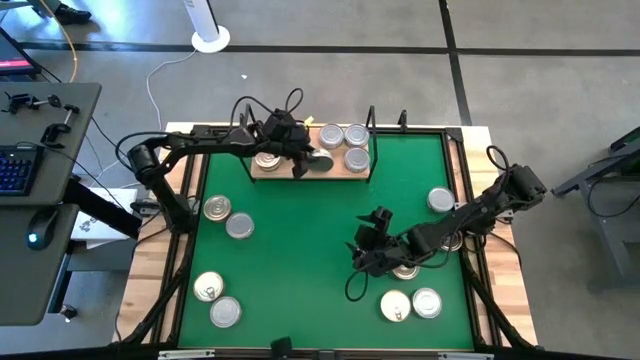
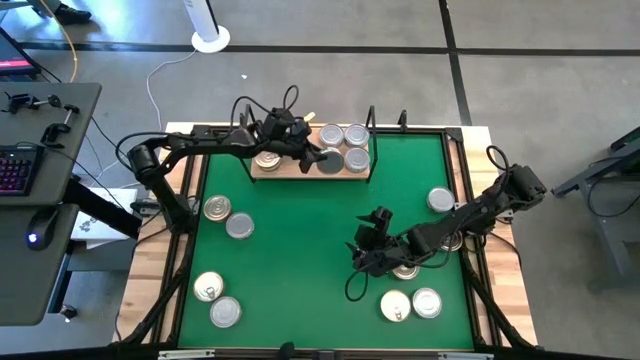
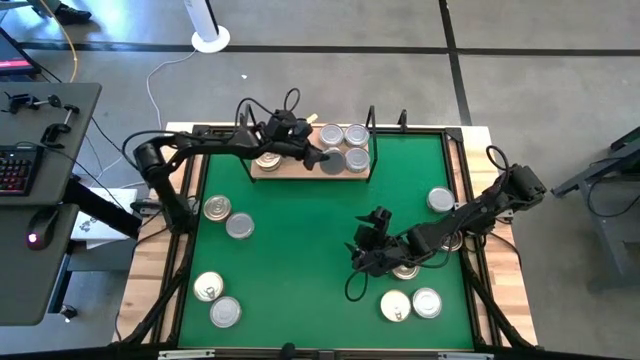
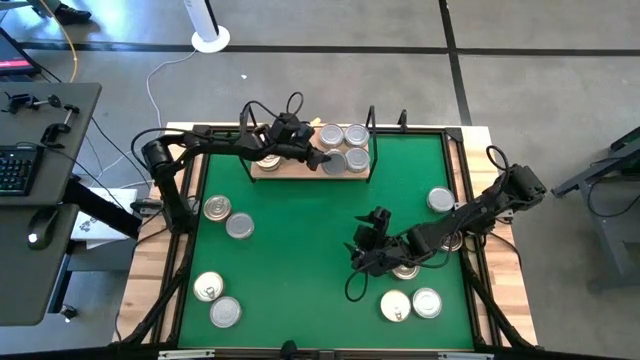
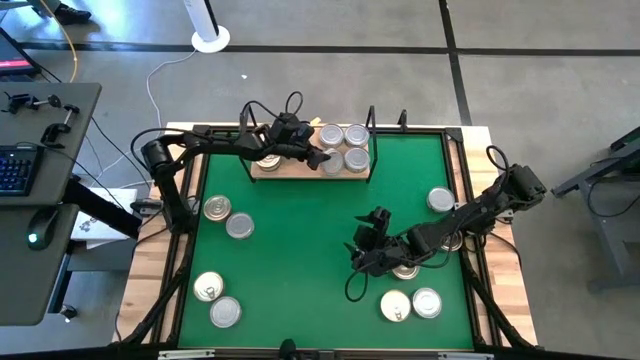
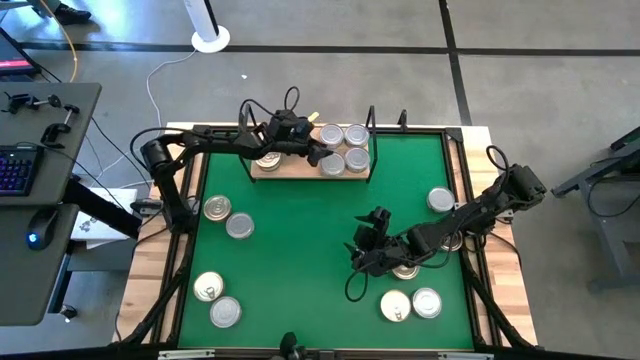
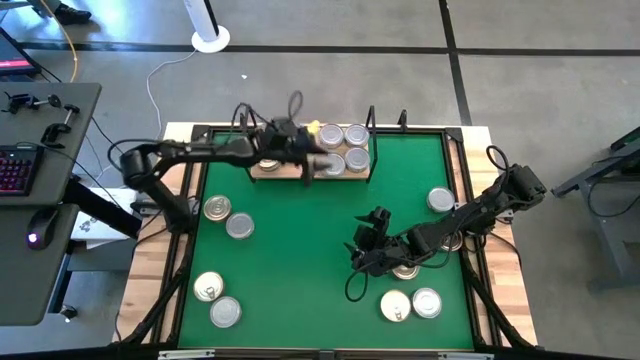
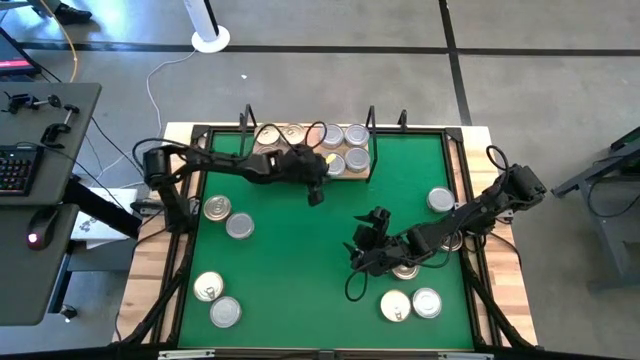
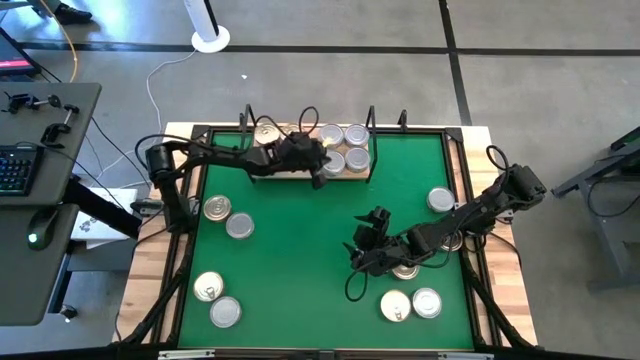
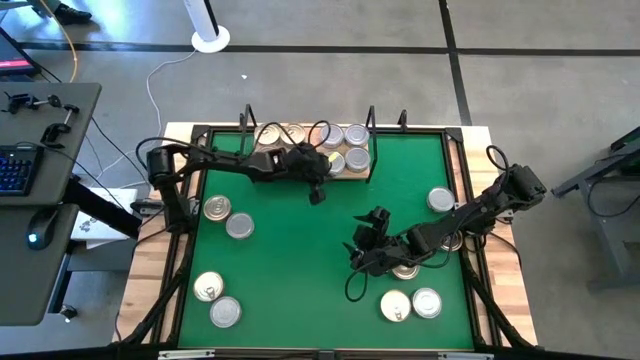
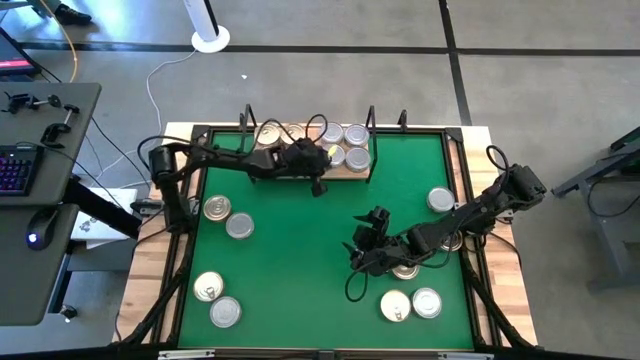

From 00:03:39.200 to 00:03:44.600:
Task: Stack canned seafood by type on shelf
Put the green tuna can on the shelf and align with the other green tuna can

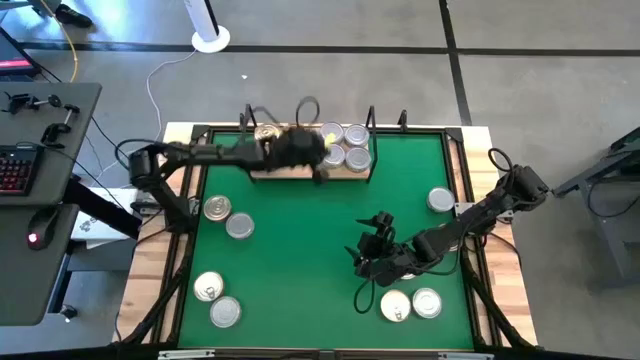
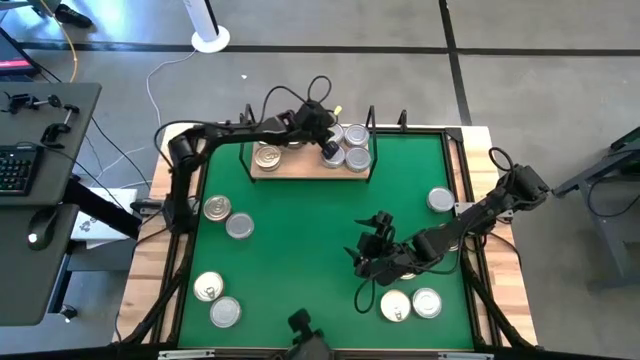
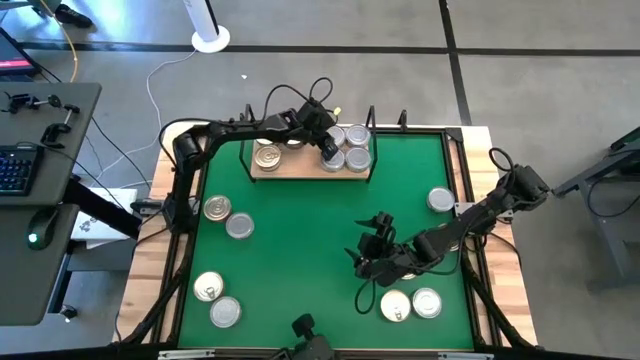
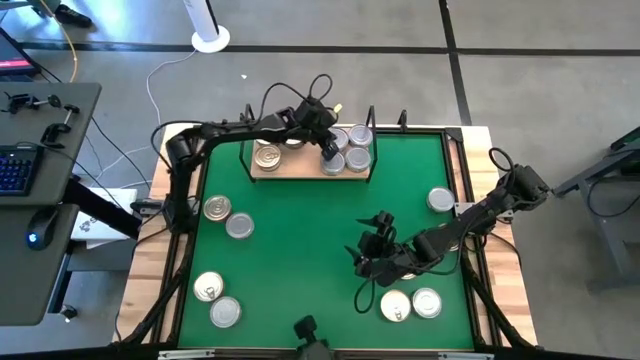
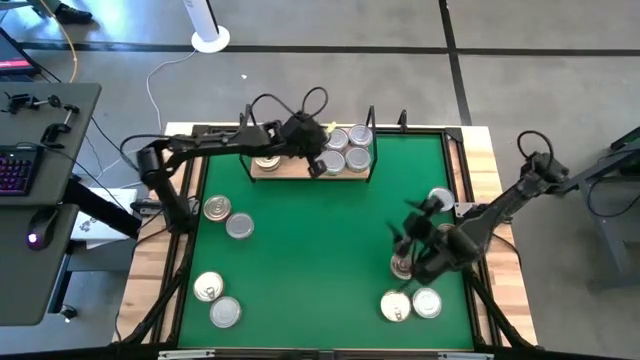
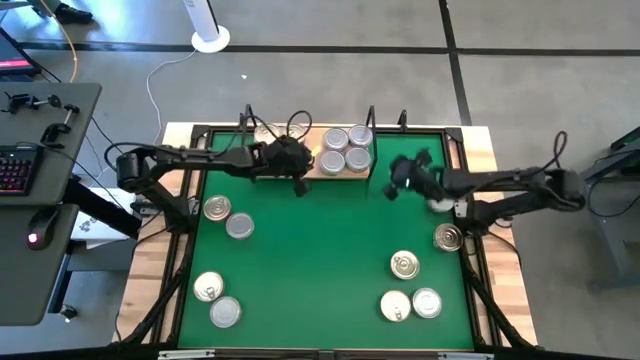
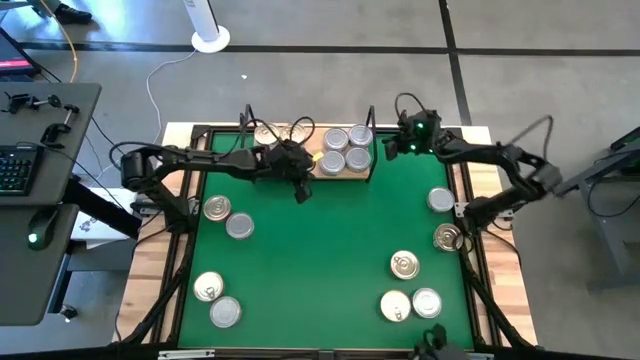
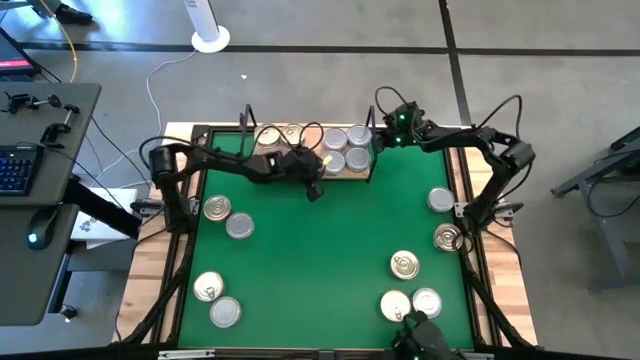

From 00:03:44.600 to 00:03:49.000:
Adjust the tuna cans on the shelf

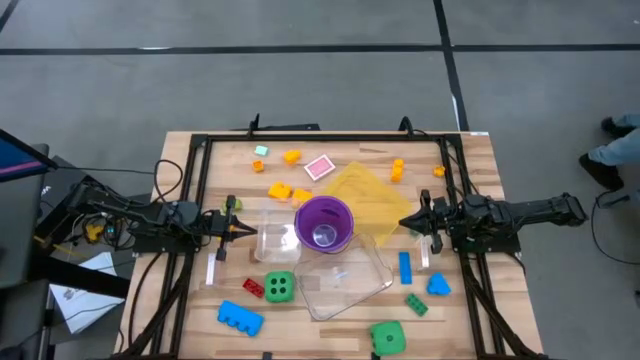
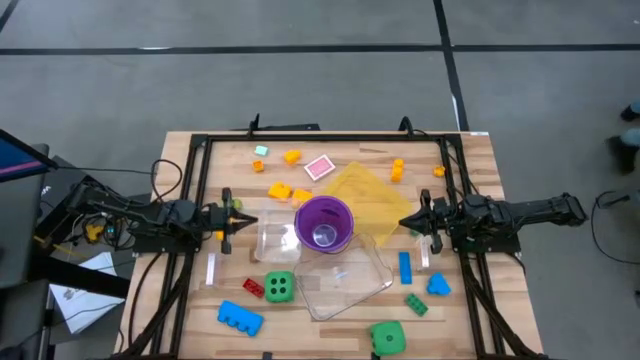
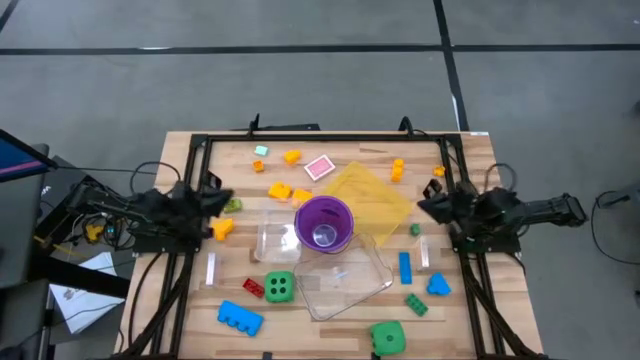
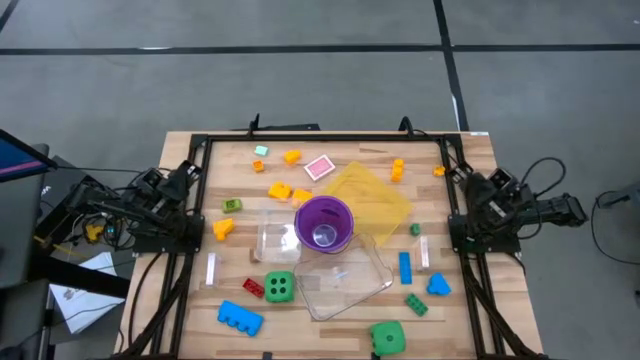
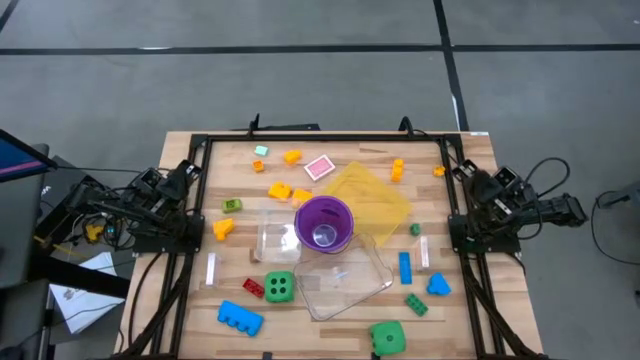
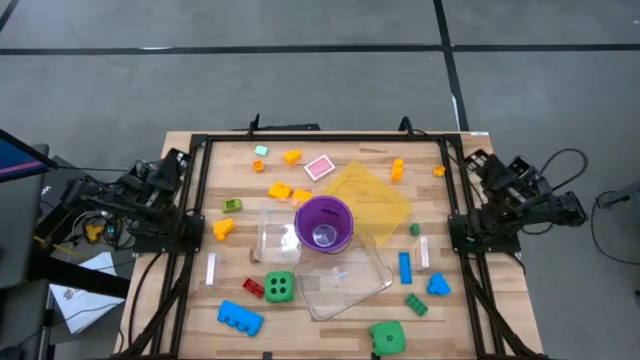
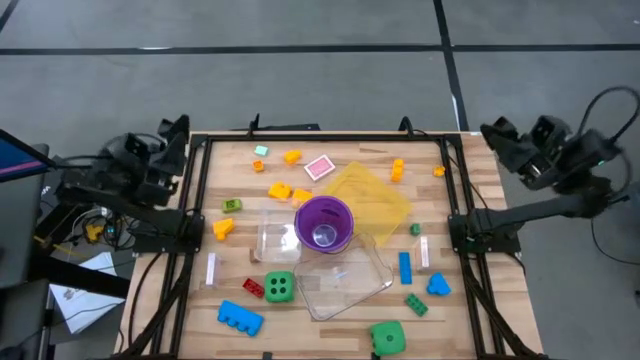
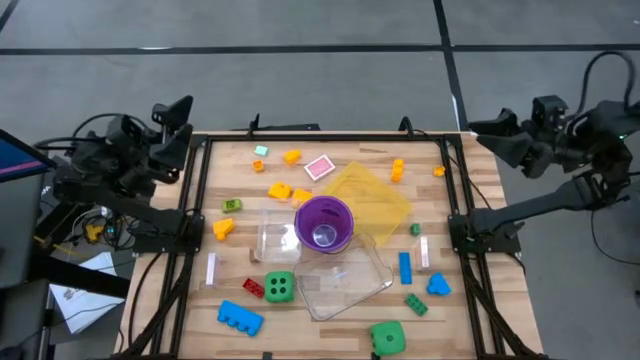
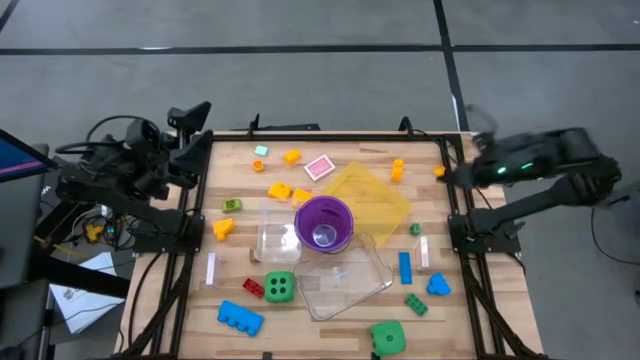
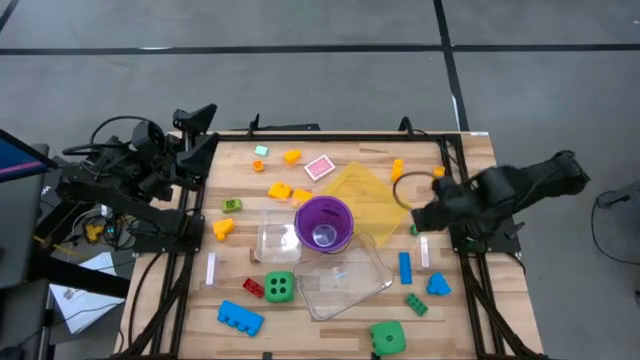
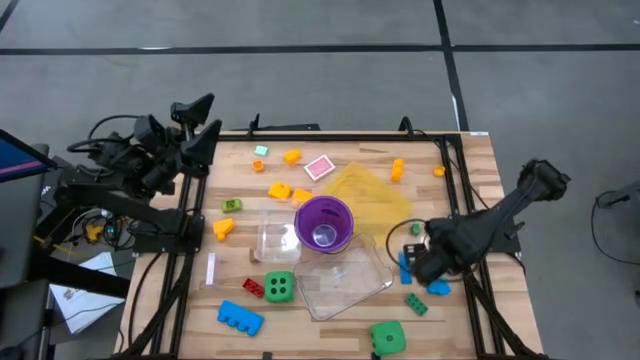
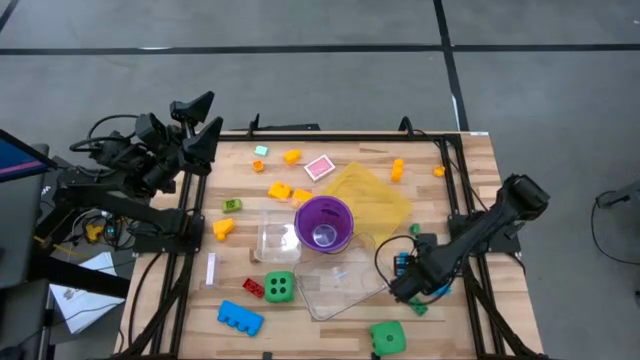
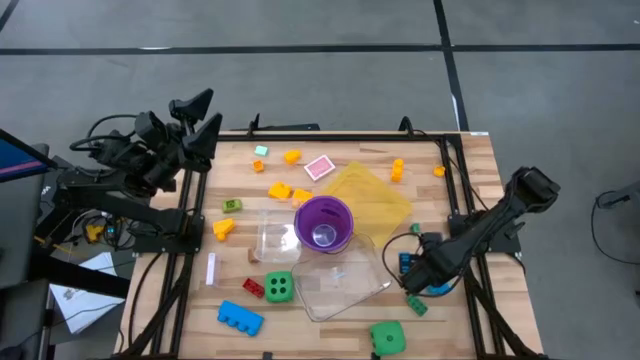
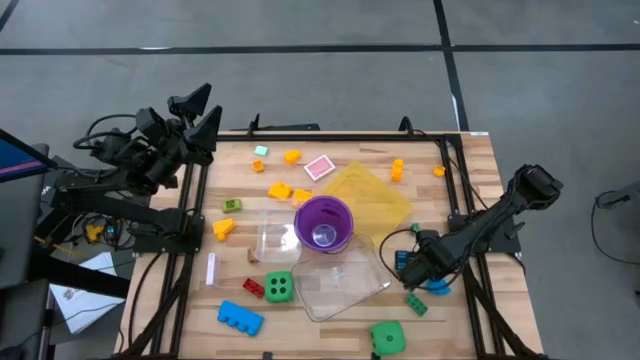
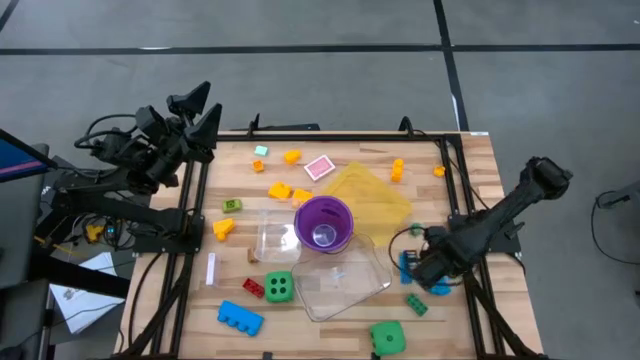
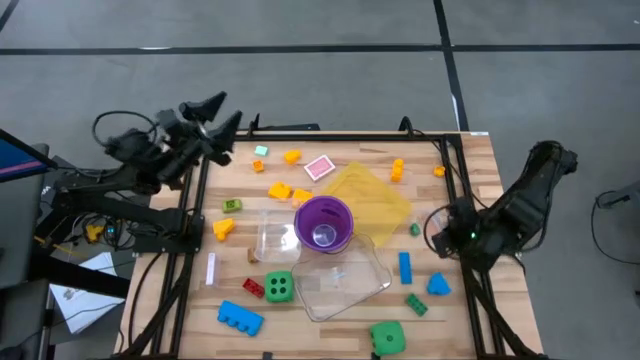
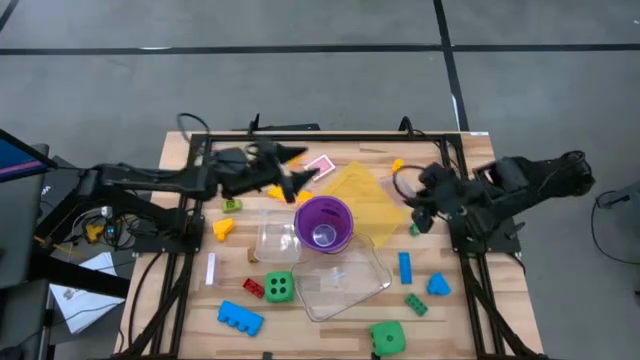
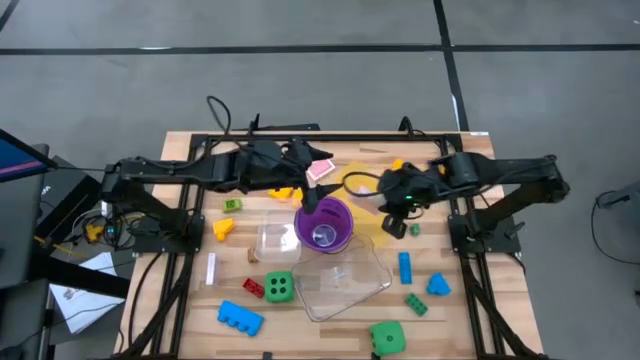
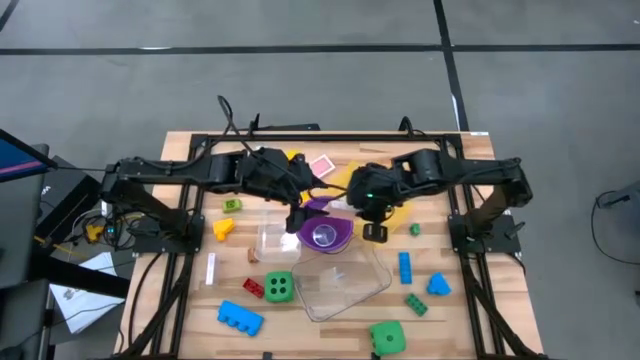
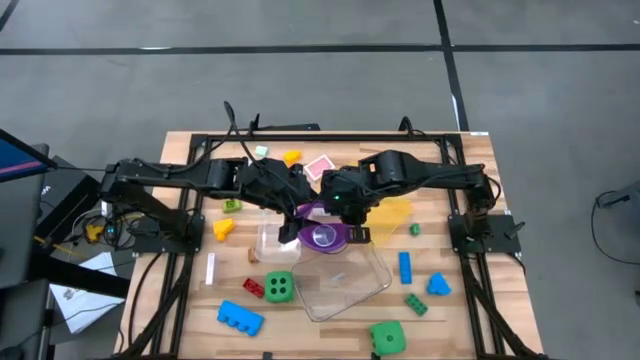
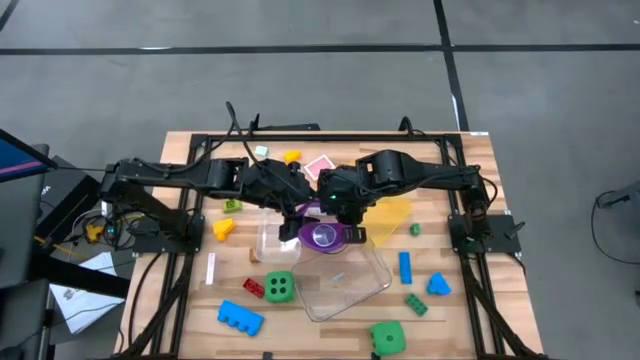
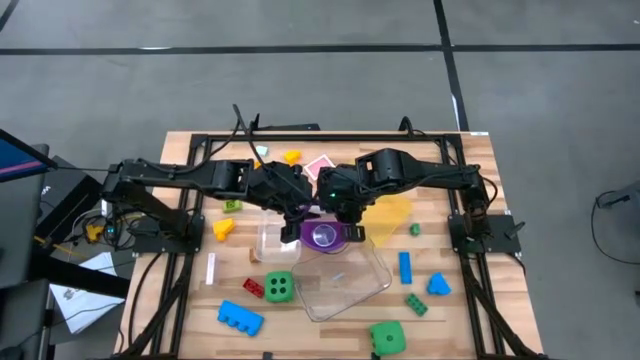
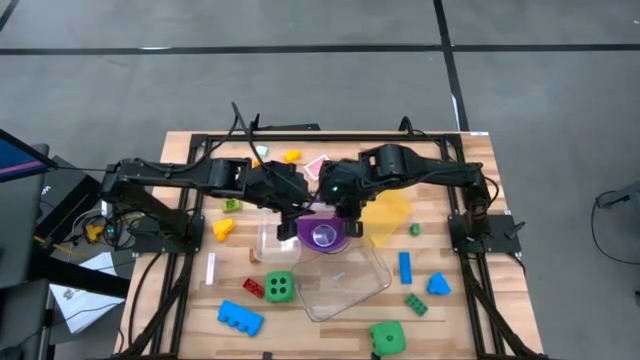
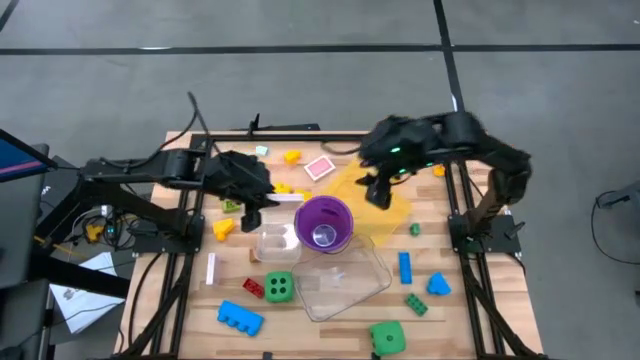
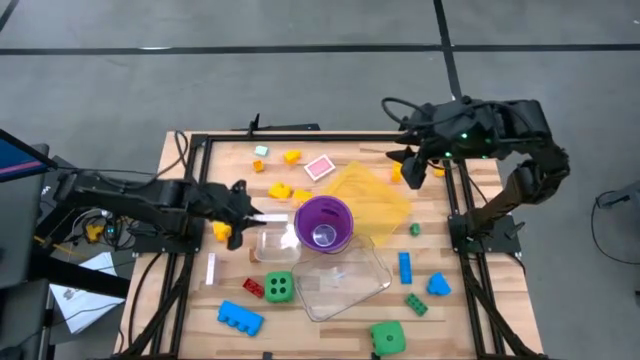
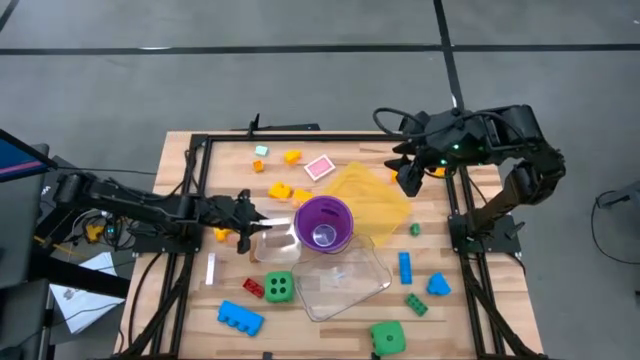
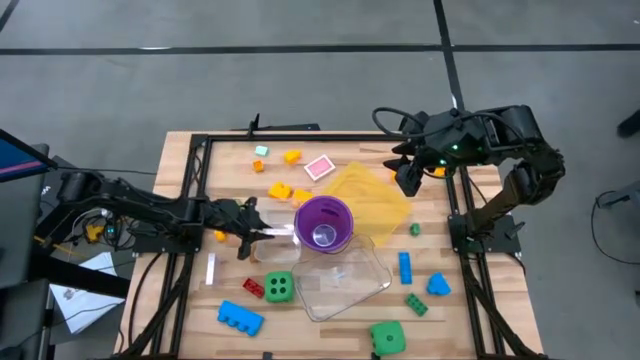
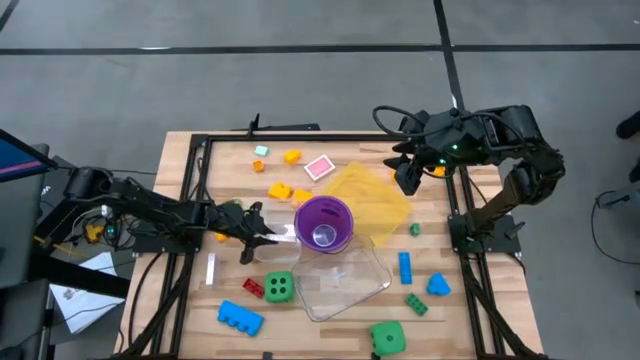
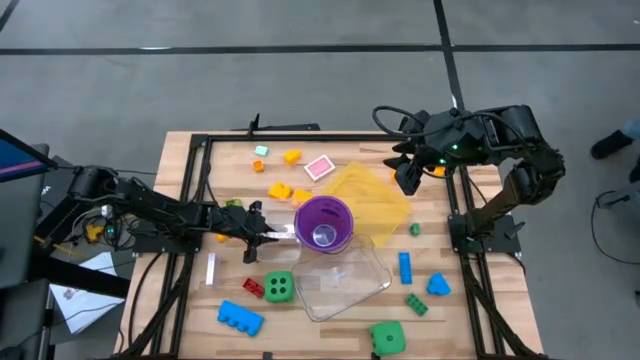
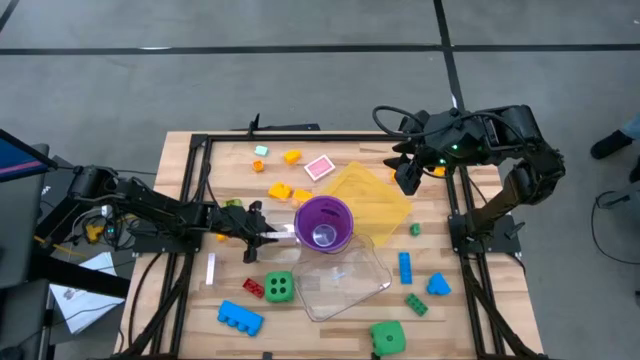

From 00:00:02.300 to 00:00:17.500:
Task: Pick & Place Toys
Put the orange deck of cards into the white bin
